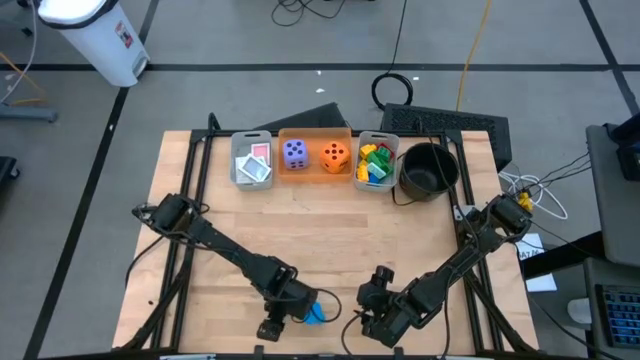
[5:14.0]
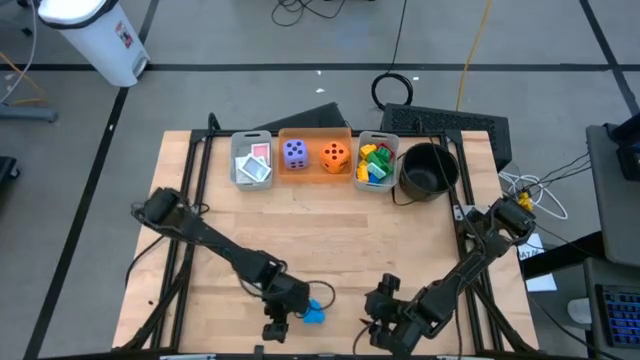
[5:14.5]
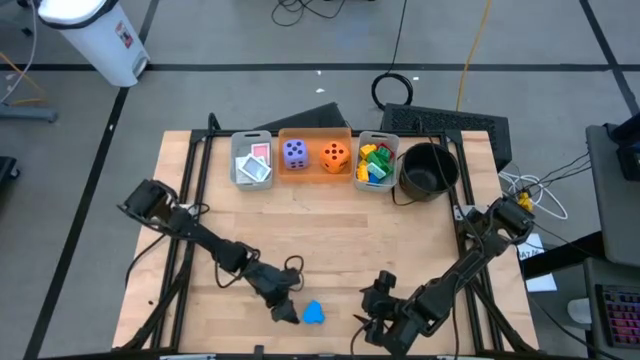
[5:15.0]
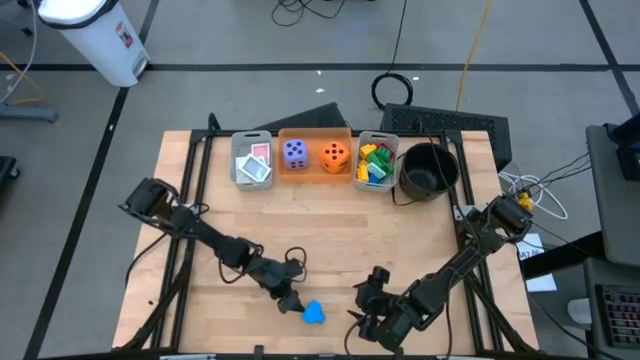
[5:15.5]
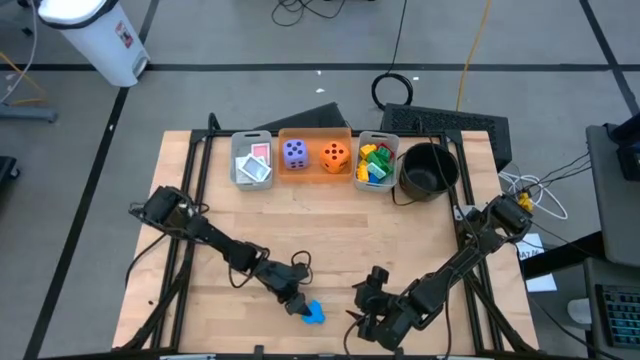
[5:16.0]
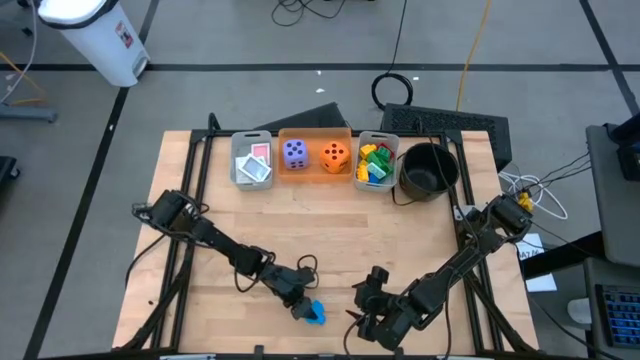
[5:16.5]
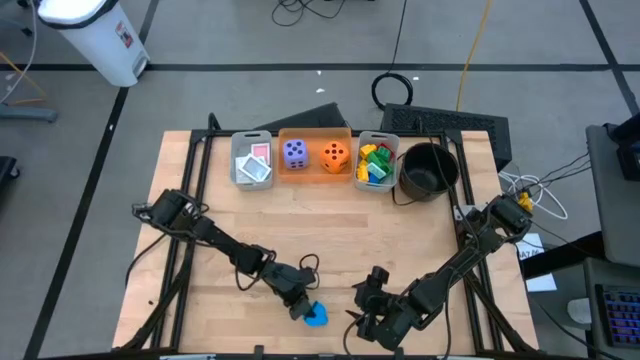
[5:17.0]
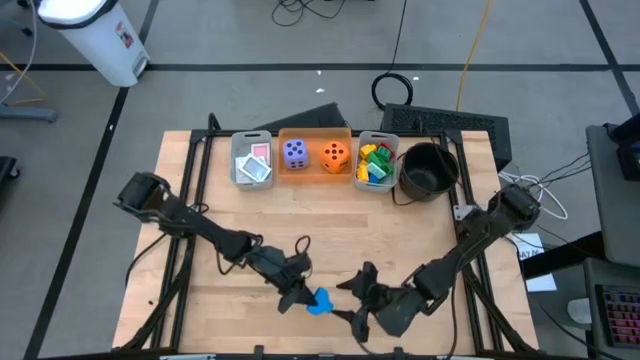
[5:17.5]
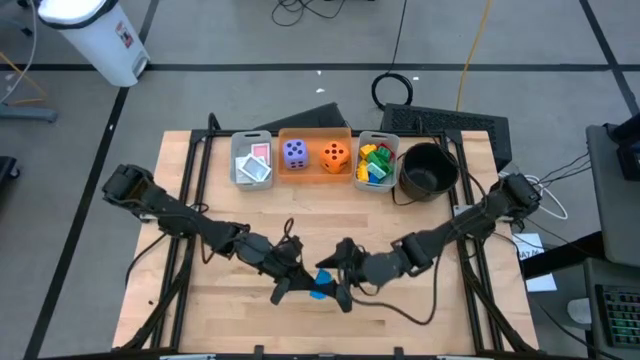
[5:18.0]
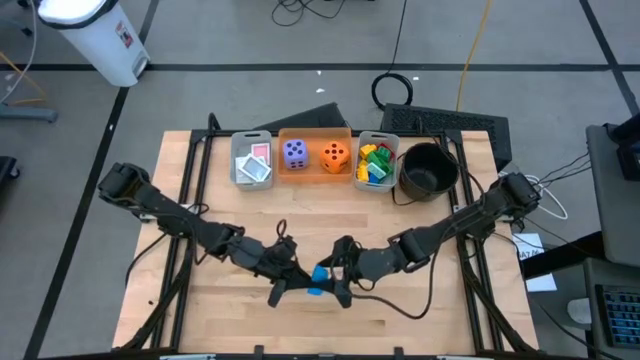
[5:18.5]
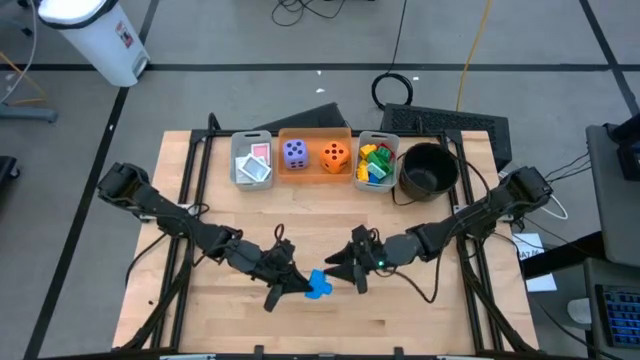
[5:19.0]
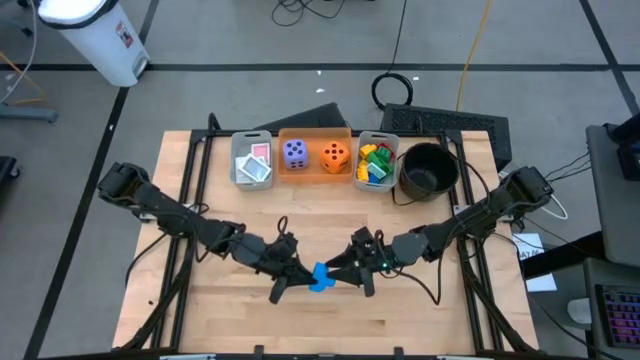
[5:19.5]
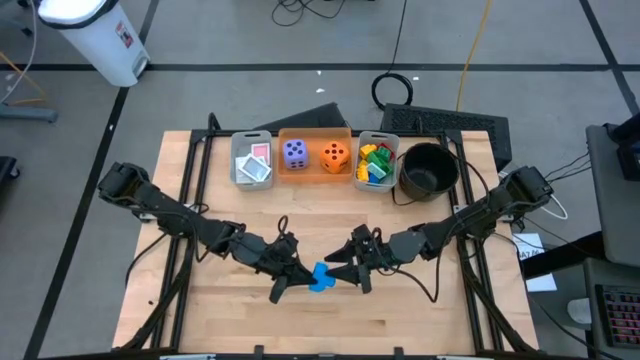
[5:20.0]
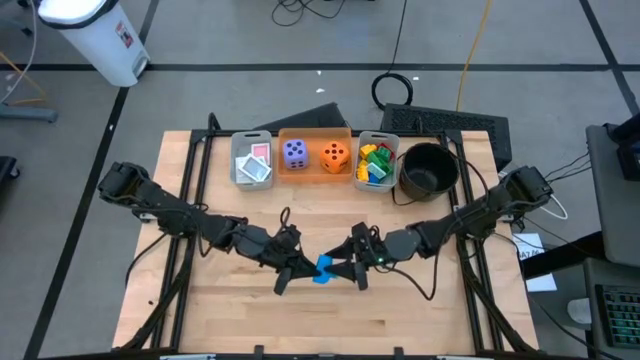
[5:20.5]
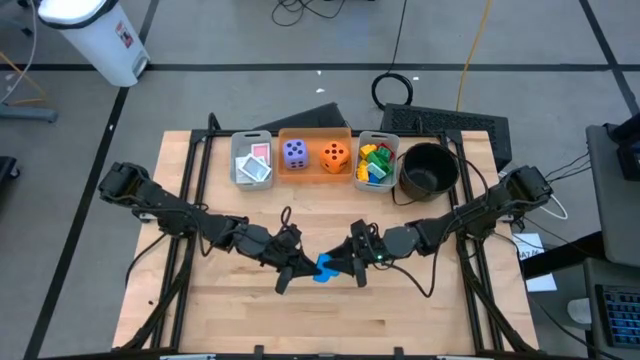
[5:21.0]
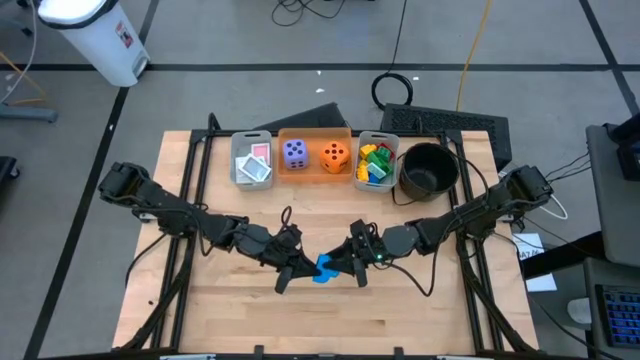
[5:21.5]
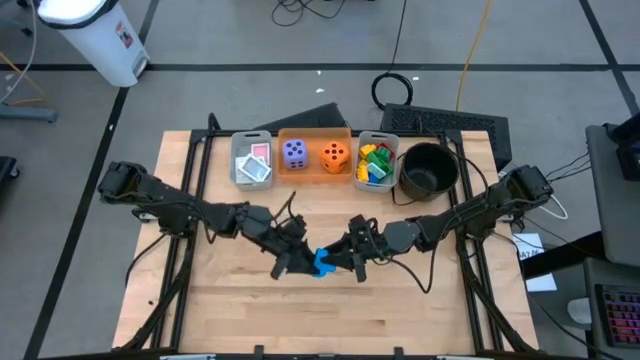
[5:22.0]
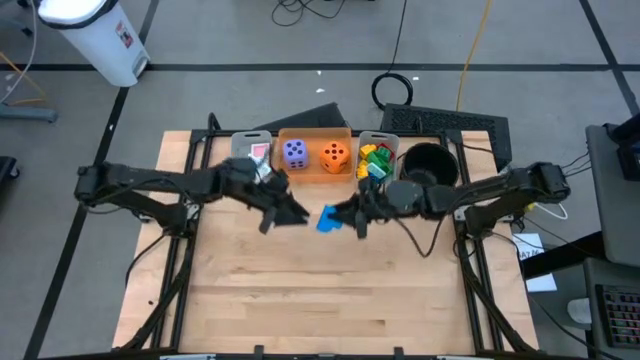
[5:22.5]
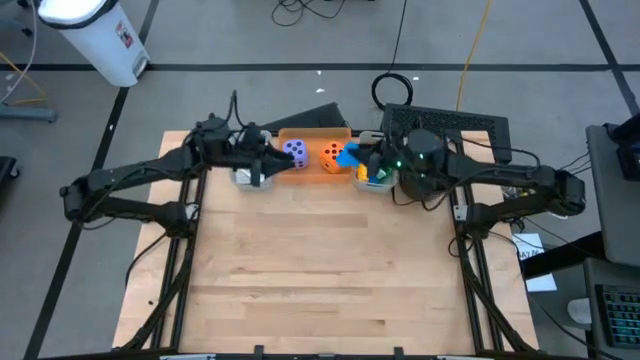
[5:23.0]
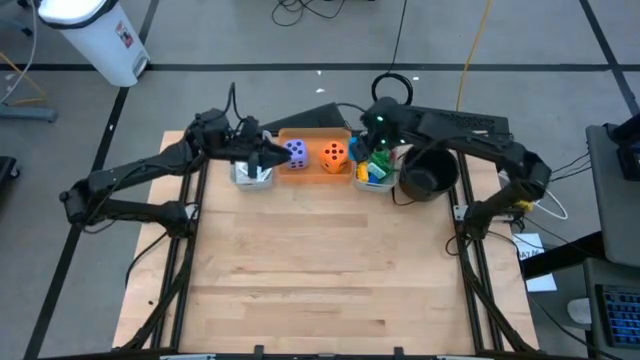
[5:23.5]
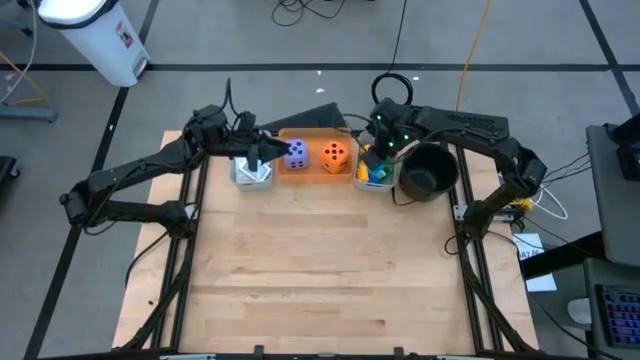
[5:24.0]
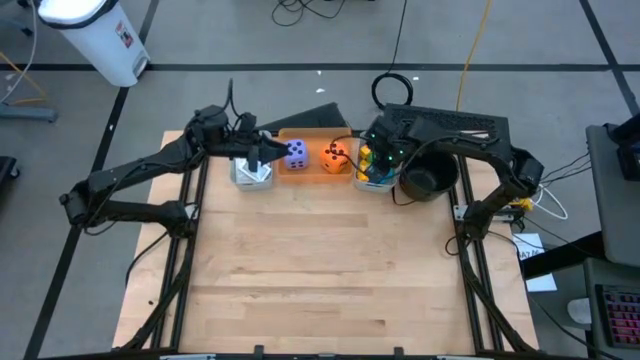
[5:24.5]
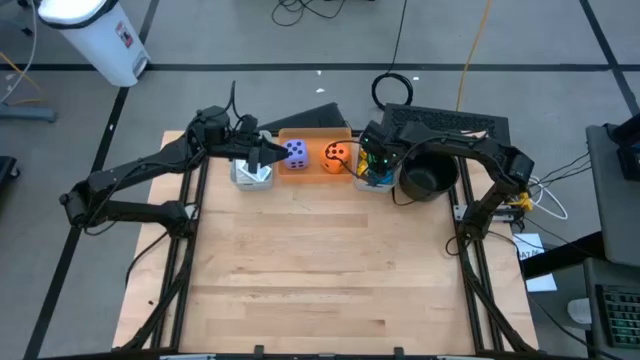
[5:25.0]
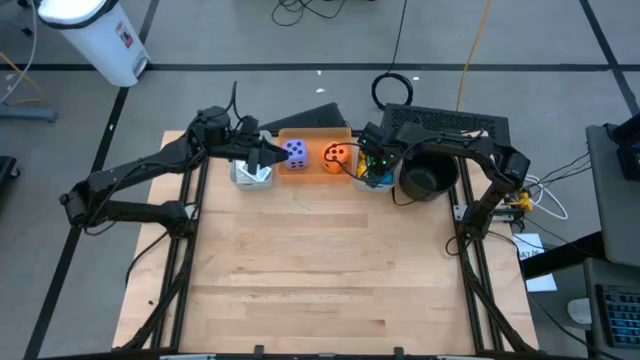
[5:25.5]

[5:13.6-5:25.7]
Task: Pick & Place Toys
Put the blue game piece into the right gray bin

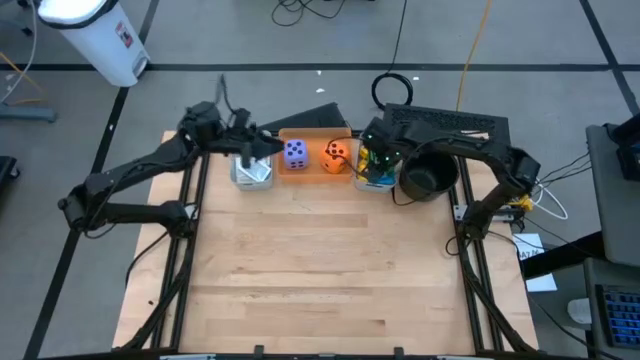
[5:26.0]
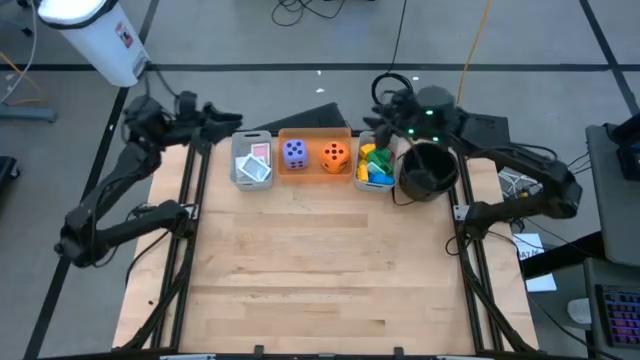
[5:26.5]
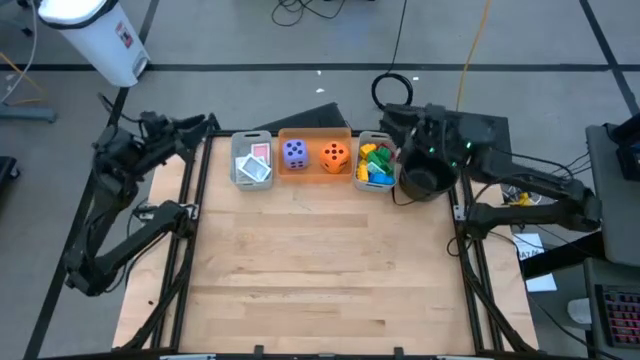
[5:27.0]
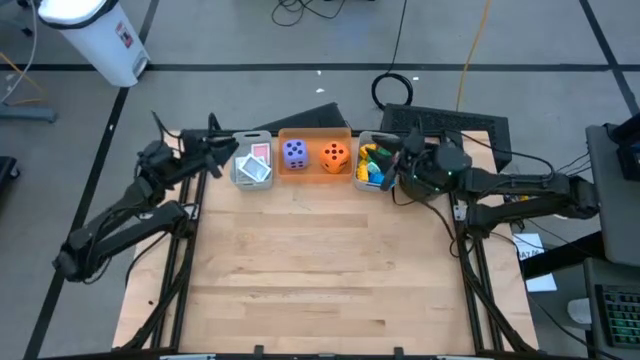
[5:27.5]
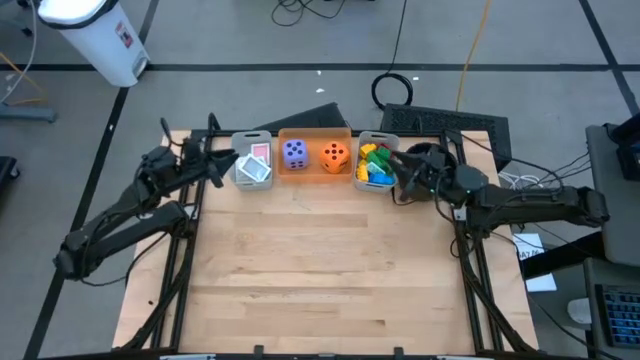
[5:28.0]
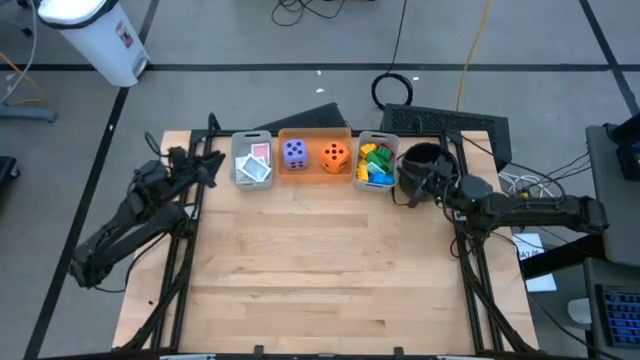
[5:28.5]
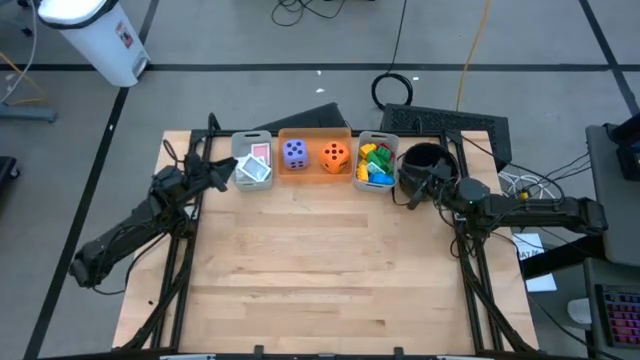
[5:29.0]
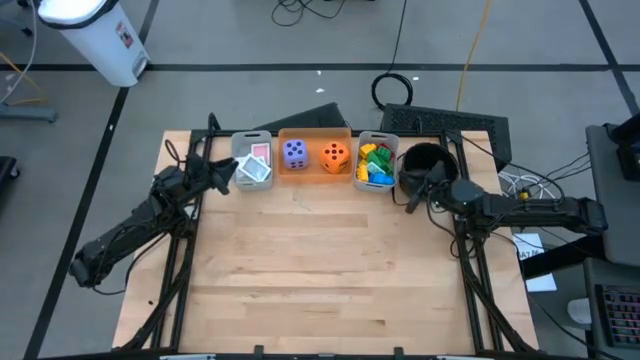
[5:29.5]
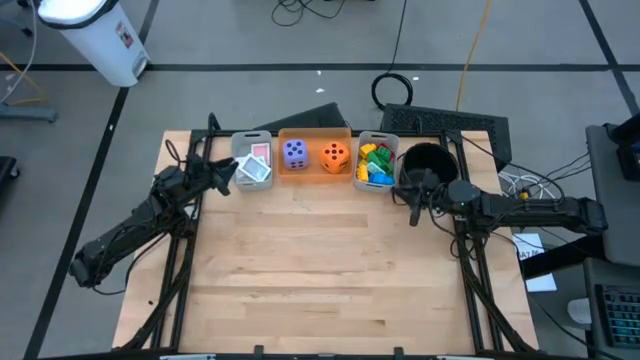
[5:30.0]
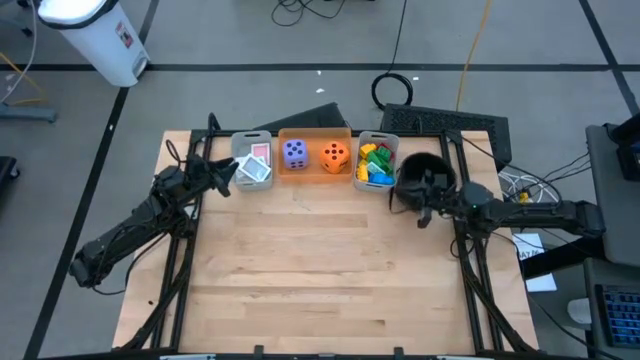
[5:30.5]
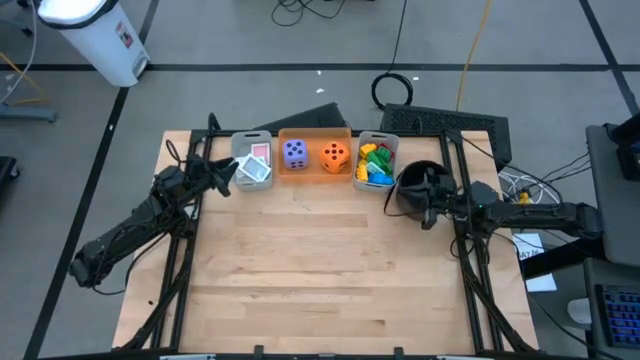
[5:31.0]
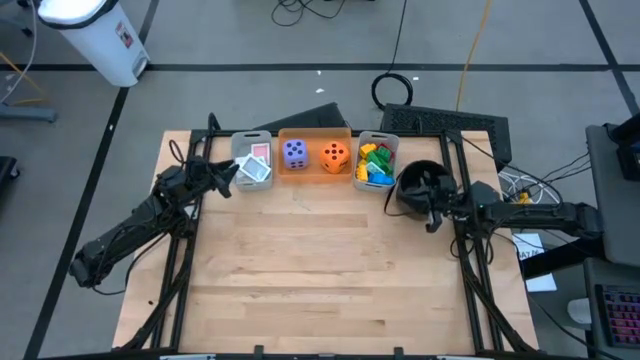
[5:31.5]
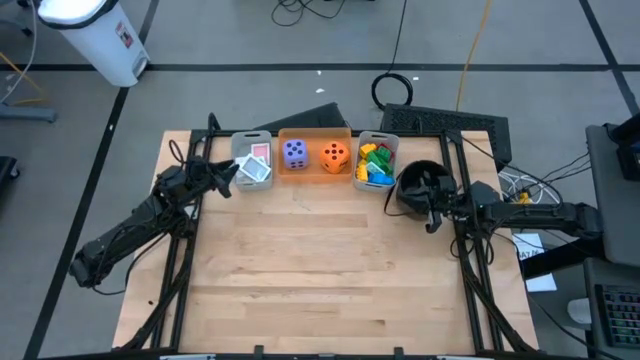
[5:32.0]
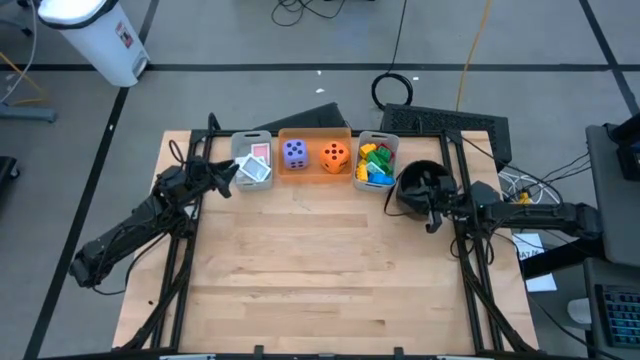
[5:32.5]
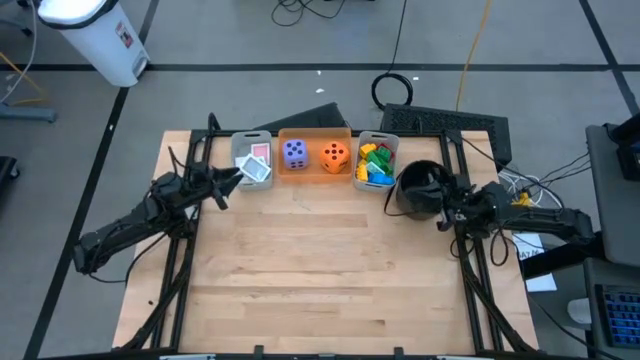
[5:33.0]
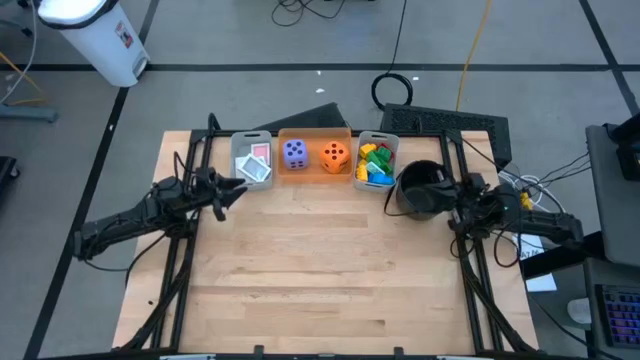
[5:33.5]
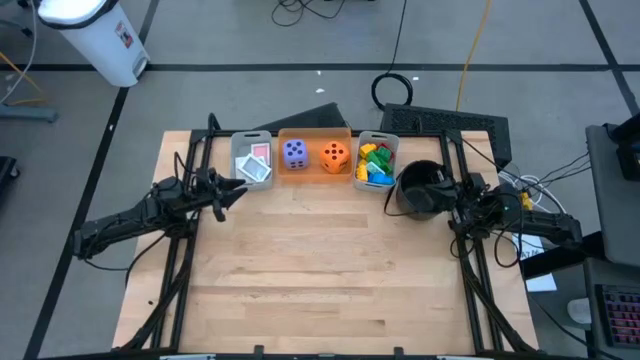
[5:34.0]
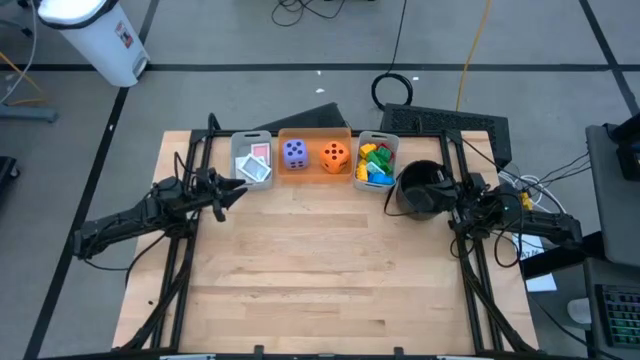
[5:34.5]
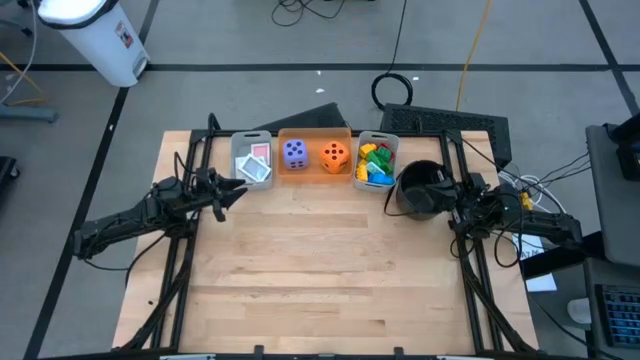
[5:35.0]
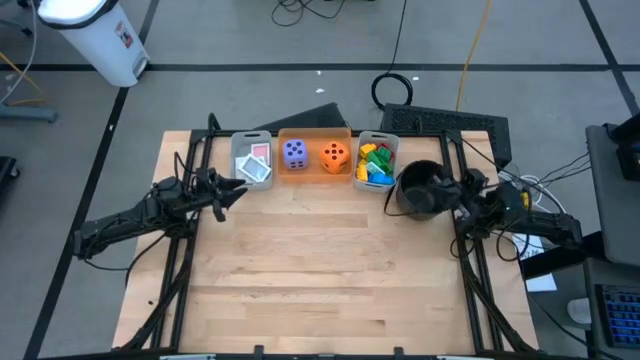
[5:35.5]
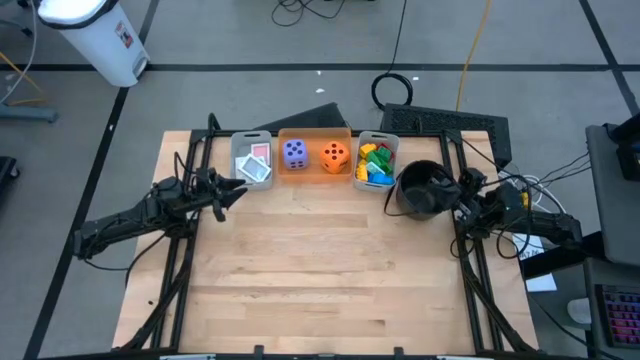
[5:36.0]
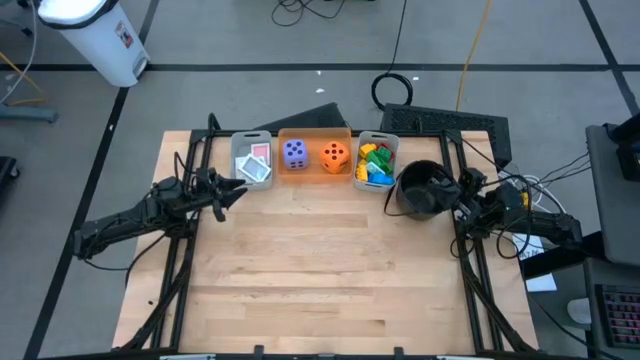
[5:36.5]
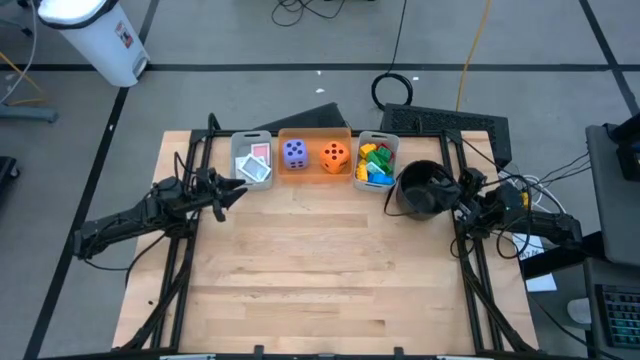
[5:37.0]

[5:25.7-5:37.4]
Return to Home Position
